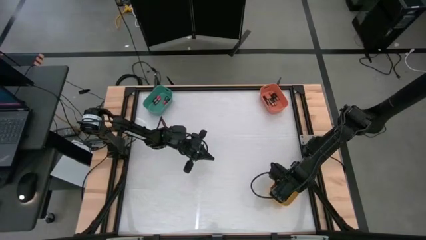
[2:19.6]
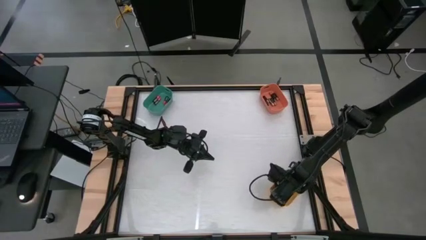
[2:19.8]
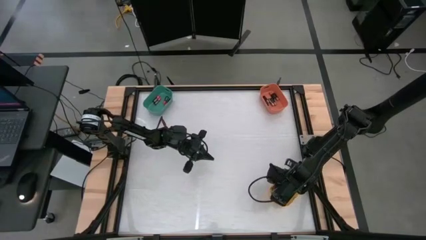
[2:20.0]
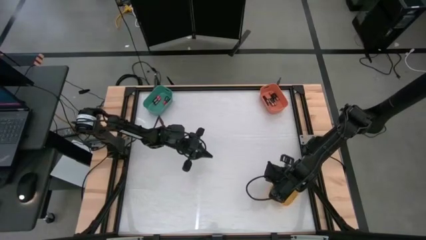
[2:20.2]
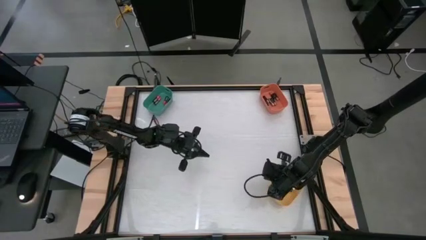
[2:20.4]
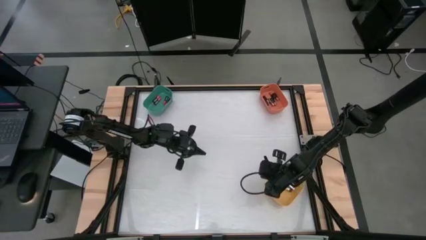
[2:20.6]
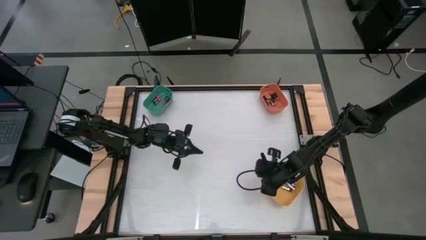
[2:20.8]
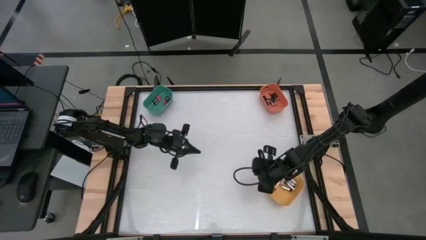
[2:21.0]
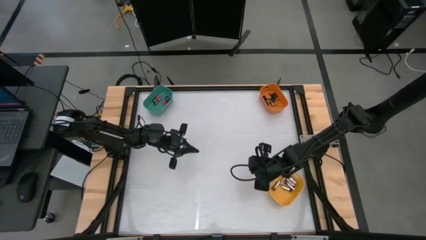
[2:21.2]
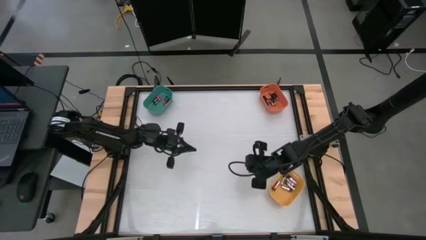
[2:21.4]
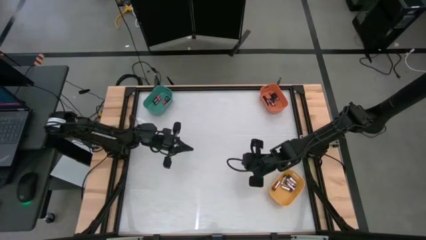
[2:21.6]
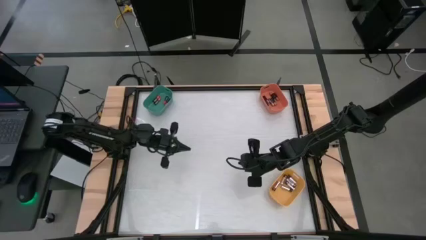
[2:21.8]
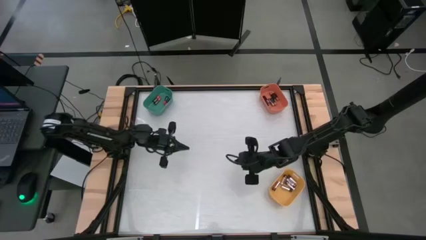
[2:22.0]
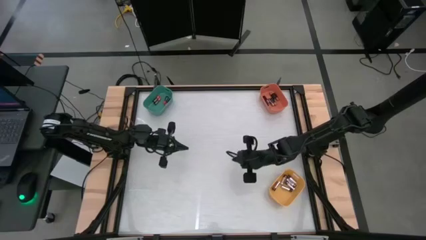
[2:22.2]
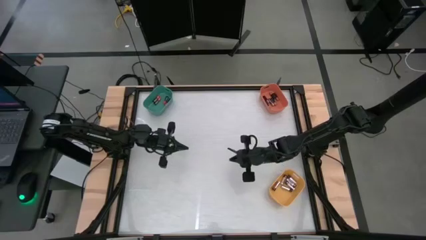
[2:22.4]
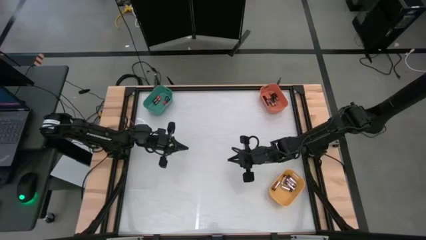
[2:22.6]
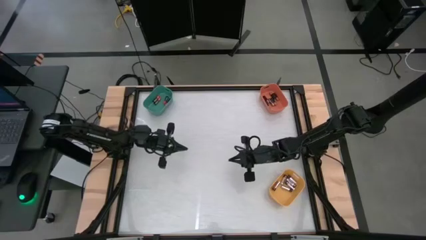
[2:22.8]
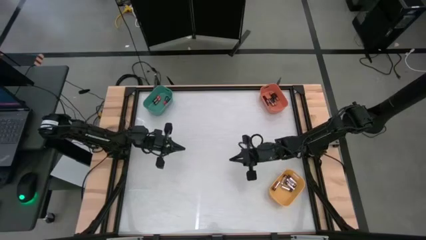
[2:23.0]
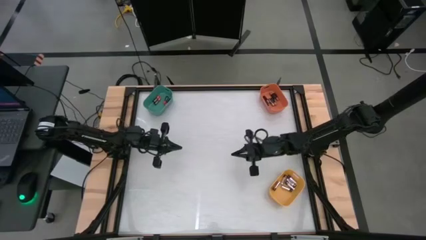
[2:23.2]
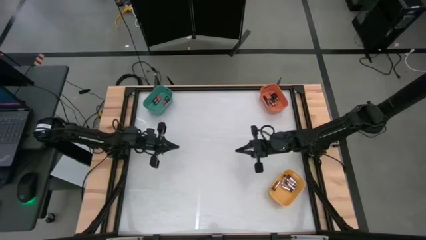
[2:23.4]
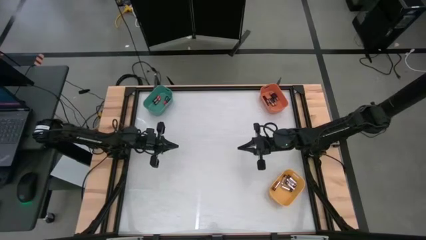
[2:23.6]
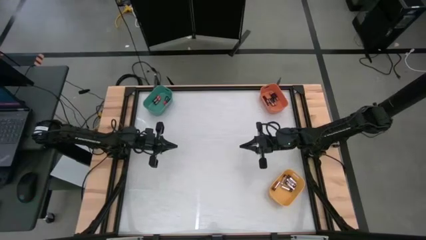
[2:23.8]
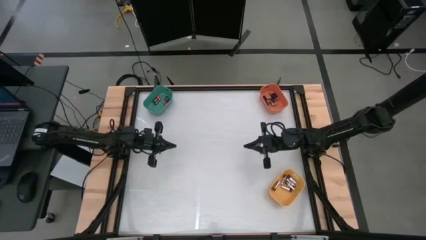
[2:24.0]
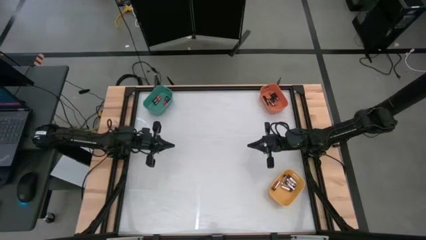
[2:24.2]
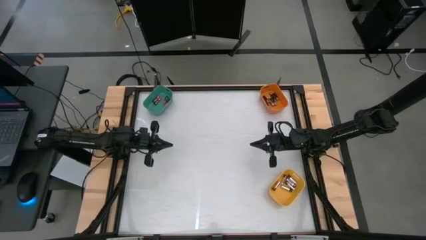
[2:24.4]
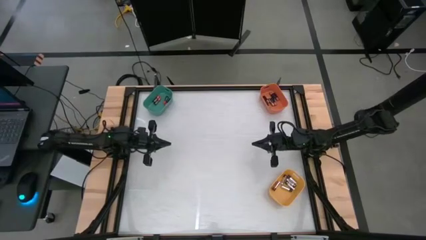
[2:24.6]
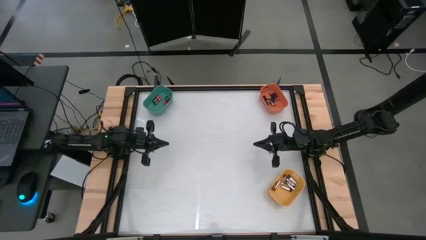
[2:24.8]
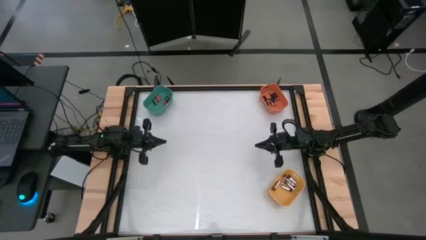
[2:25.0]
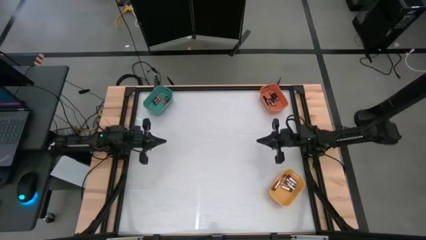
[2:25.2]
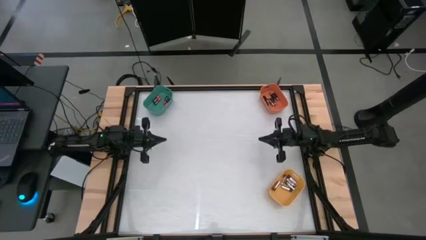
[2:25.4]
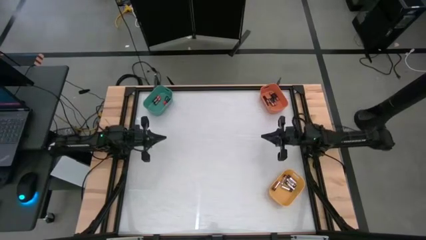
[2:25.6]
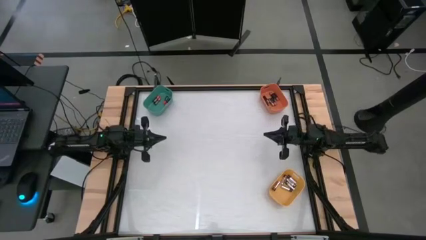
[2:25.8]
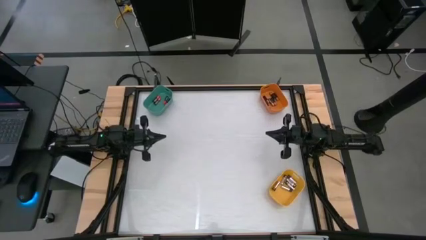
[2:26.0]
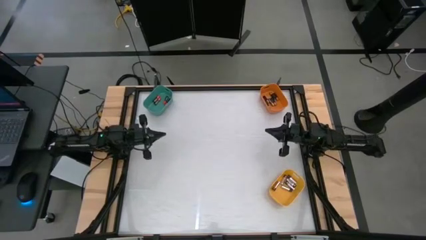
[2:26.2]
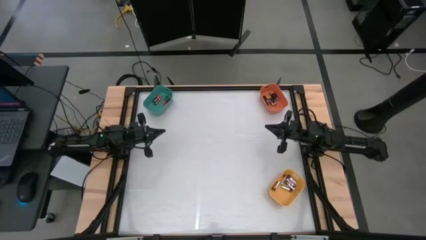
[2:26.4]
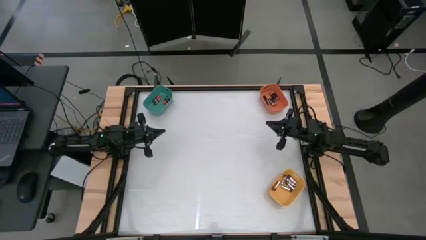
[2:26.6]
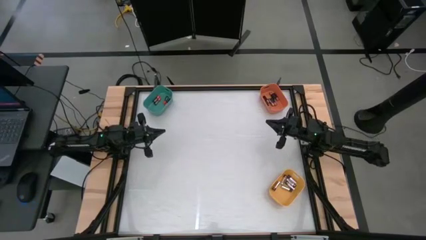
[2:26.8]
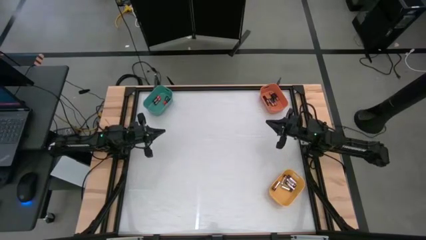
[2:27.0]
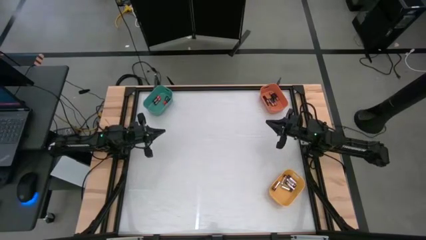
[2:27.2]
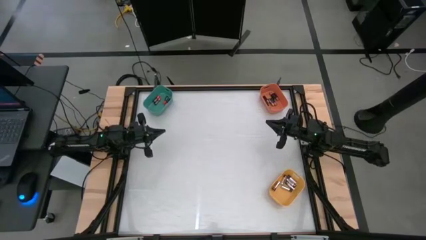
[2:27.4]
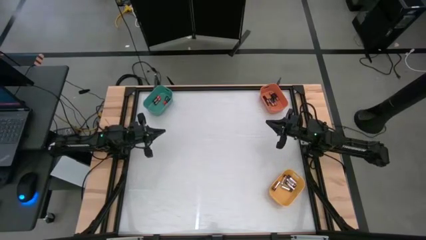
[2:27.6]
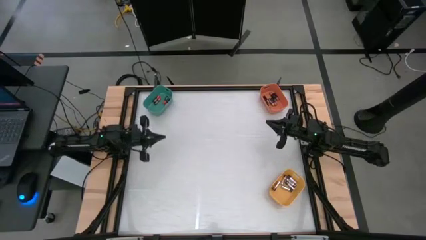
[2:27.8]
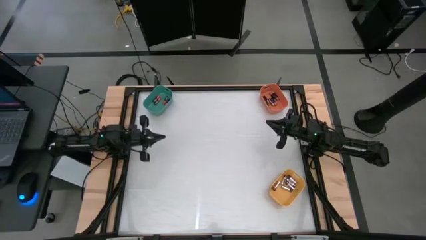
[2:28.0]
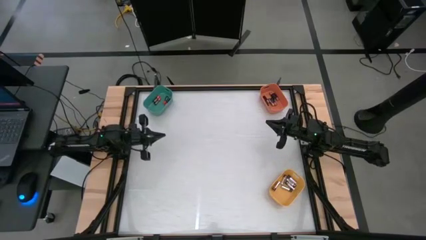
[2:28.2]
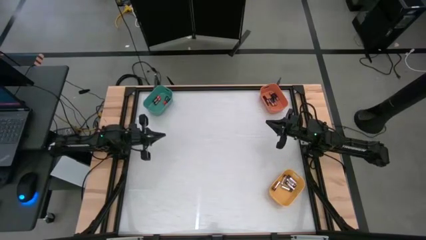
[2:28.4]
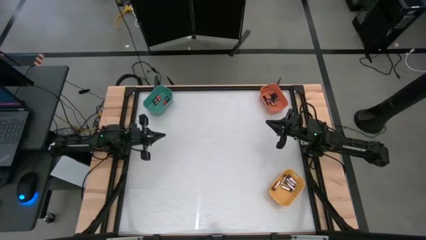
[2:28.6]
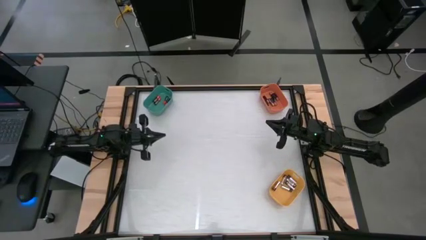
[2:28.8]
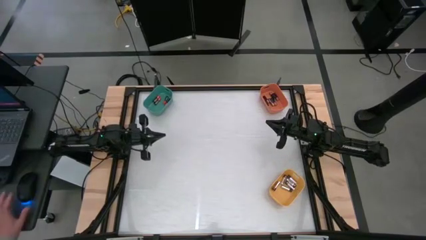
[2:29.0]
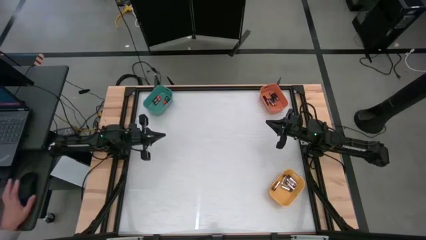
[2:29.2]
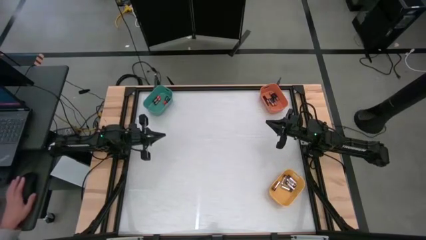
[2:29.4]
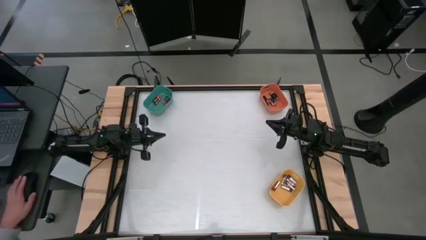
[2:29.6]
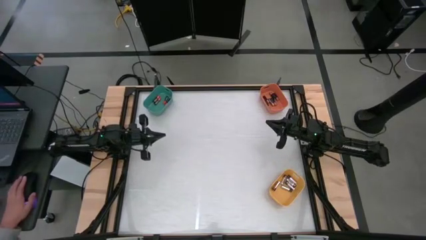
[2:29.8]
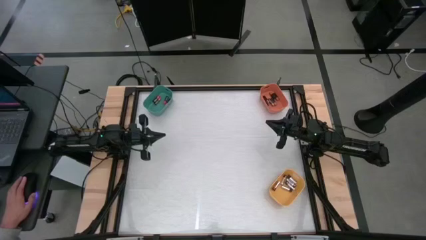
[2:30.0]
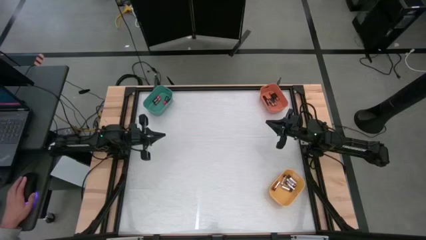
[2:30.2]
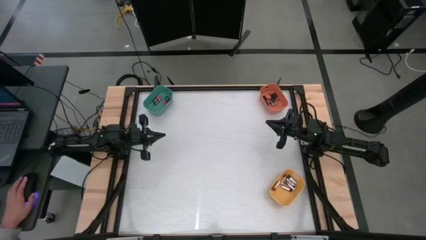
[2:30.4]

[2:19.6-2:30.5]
Task: Sort batteries
Return to Home Position

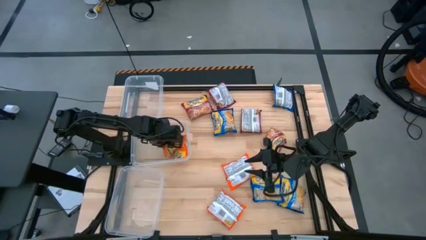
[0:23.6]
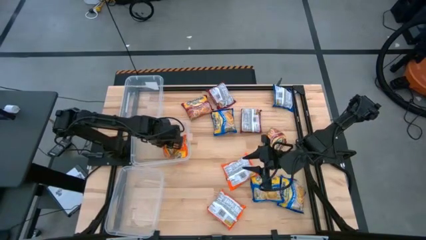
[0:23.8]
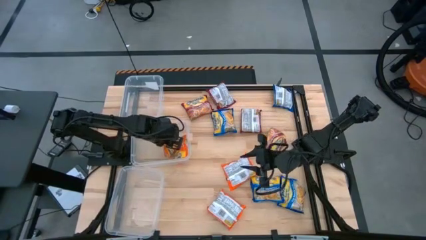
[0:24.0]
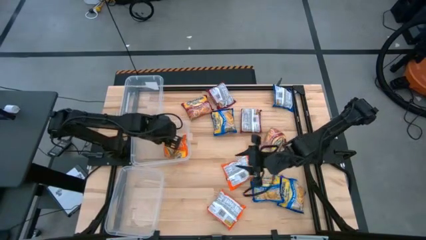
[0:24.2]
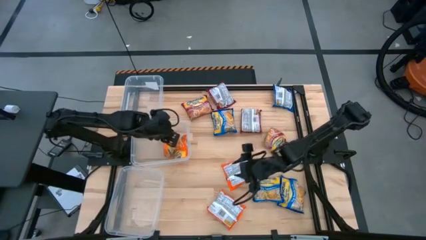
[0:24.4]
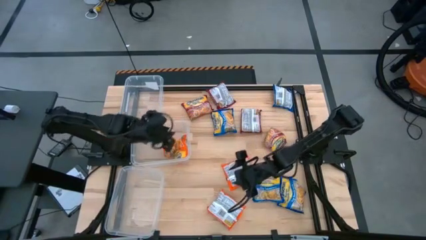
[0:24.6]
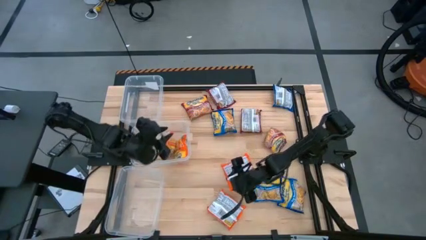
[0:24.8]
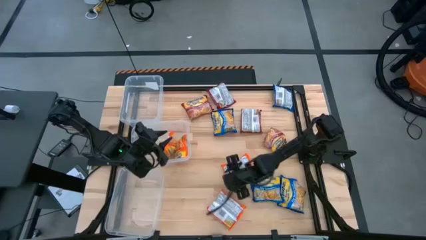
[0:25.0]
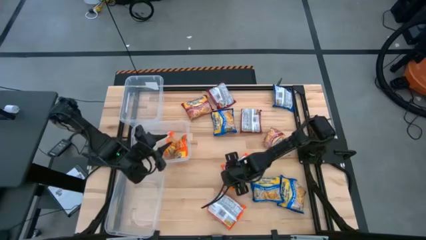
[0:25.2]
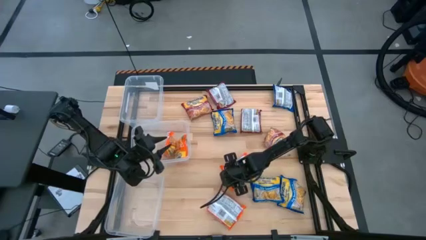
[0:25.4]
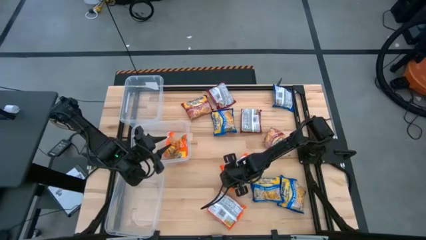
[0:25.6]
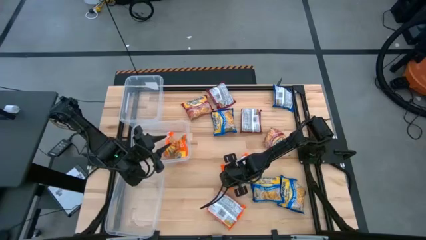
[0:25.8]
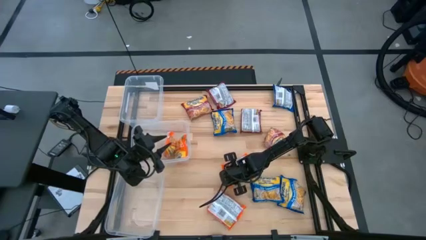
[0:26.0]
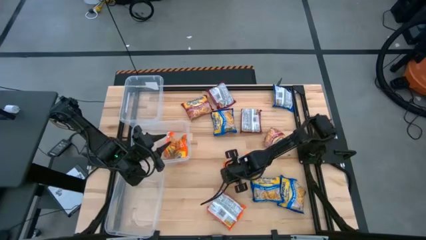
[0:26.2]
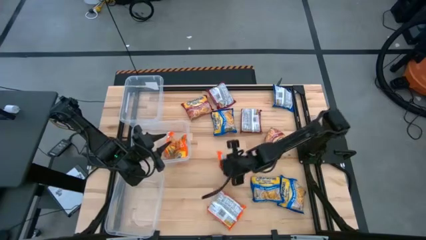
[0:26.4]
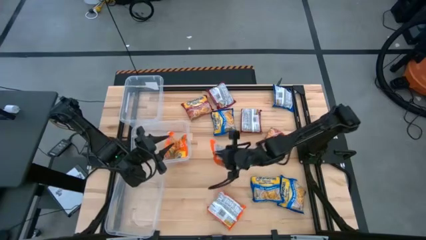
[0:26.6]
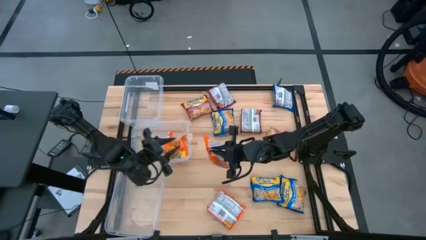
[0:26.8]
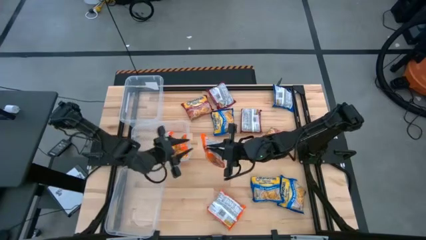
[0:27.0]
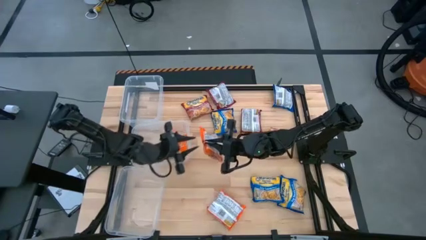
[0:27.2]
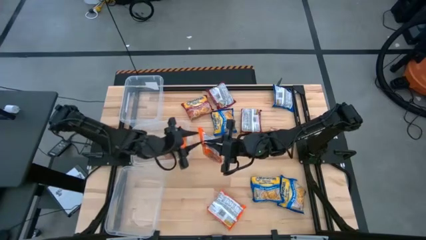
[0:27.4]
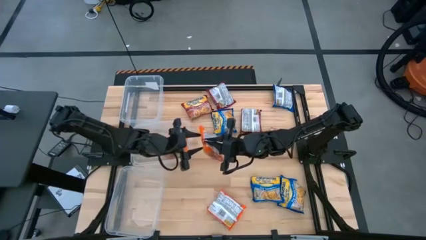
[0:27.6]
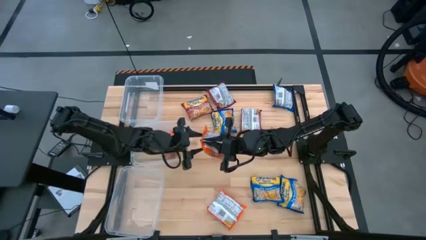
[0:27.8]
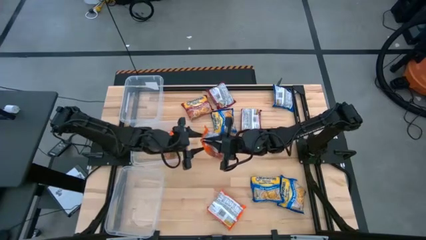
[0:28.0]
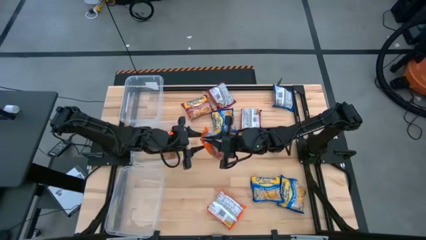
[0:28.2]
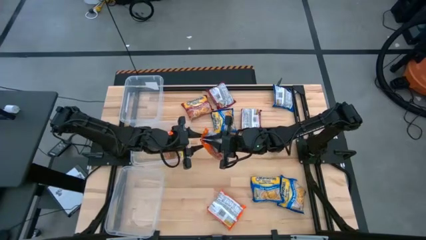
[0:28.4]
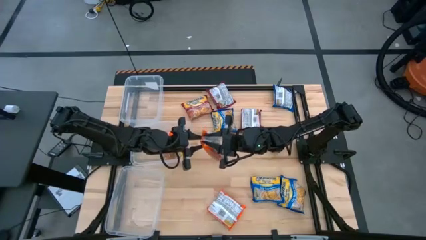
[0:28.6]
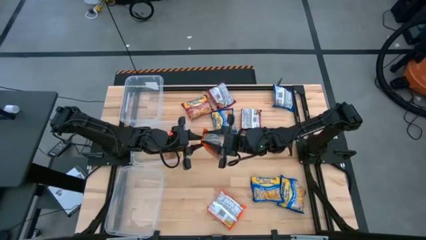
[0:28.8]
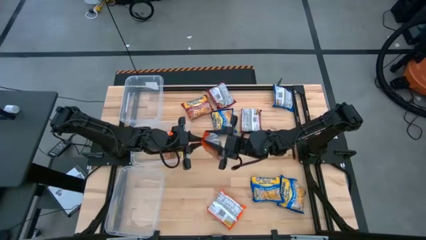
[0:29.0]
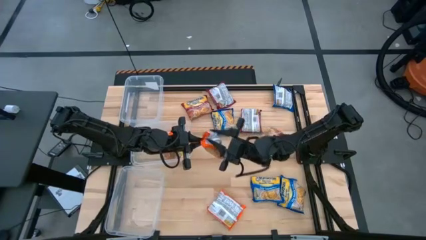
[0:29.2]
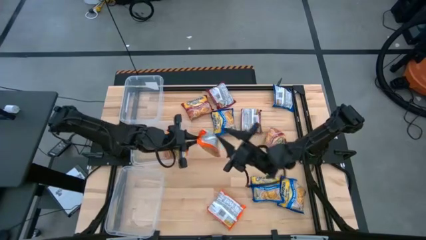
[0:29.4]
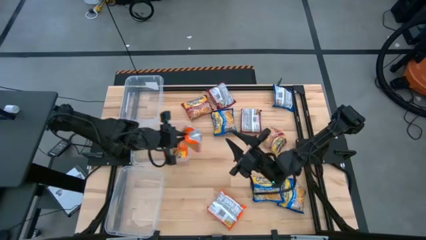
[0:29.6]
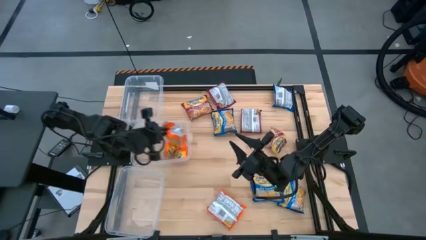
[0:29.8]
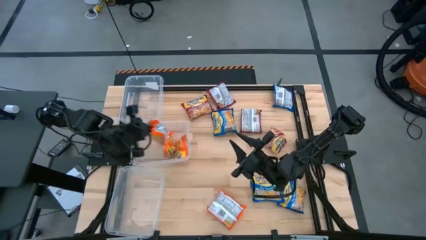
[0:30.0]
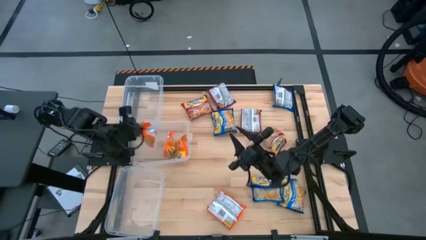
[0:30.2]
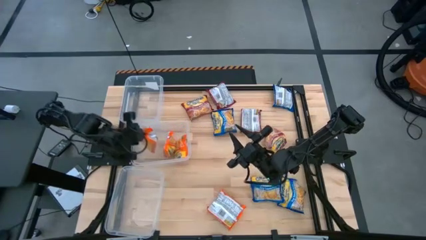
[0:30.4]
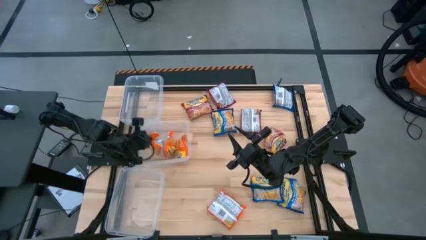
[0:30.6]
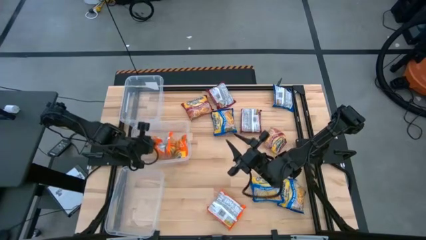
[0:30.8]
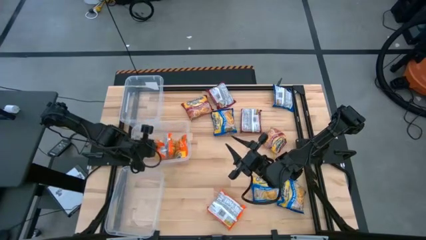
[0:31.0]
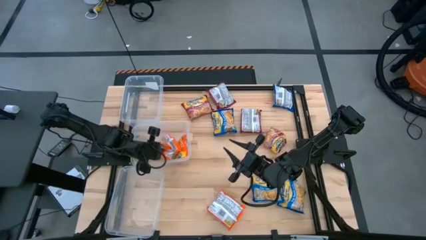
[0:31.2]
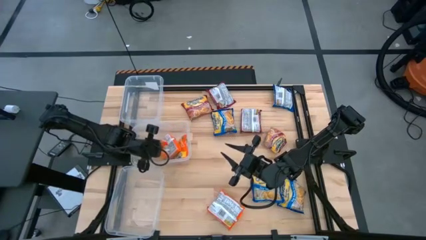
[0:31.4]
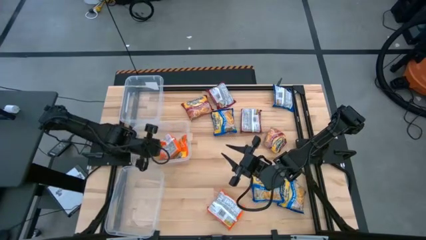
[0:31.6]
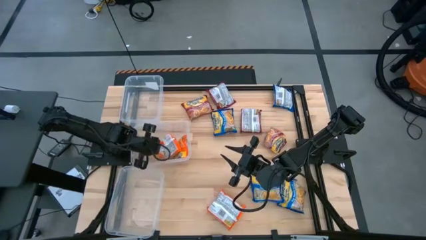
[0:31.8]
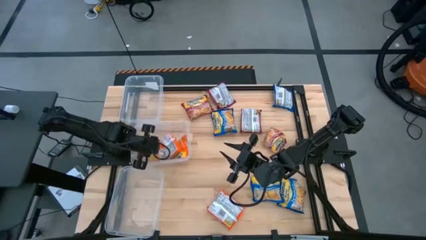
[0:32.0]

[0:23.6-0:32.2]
Task: Sort Maruchan noodles
Put the orange noodle pack into the middle transparent bin
